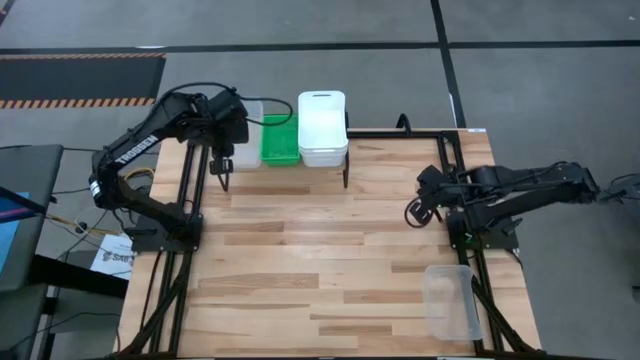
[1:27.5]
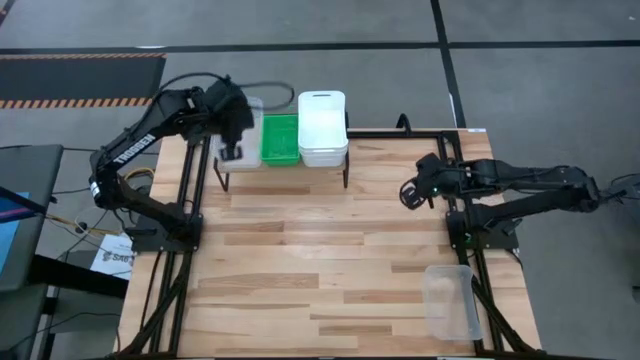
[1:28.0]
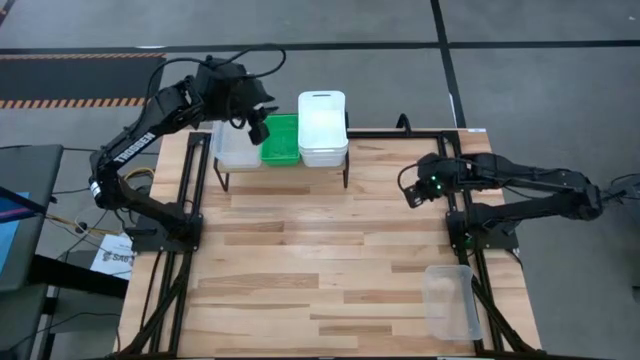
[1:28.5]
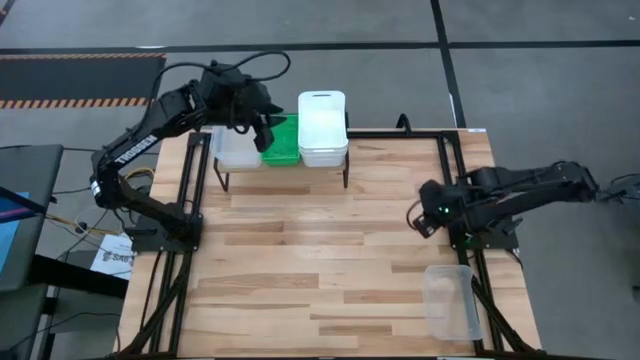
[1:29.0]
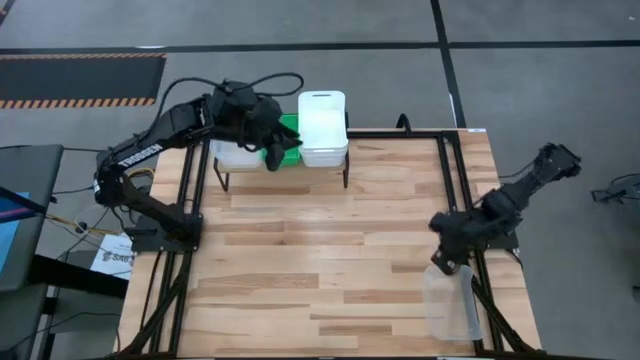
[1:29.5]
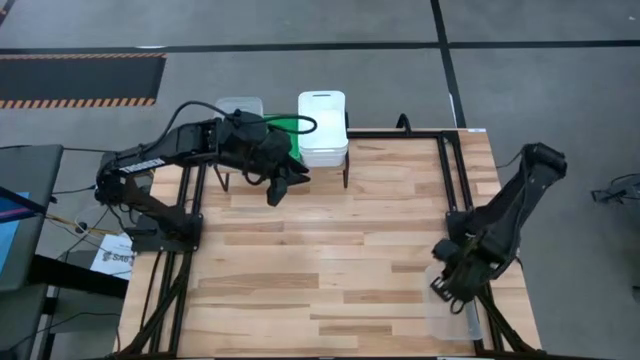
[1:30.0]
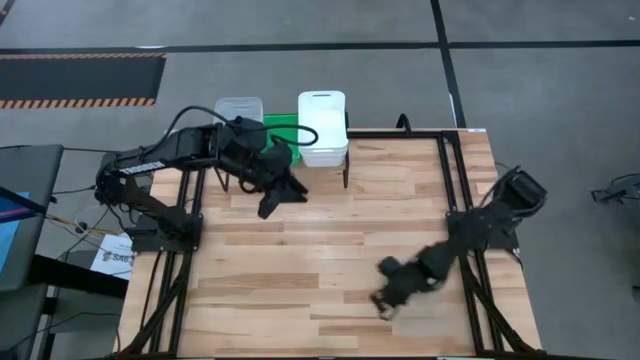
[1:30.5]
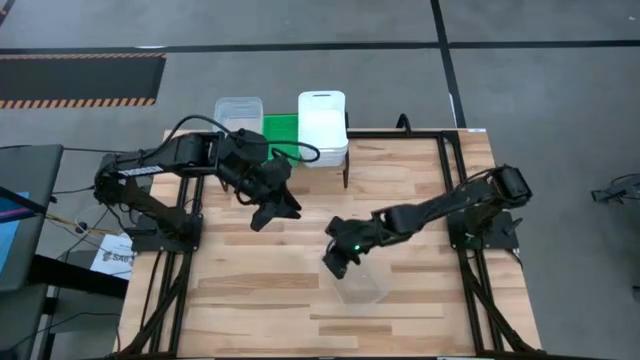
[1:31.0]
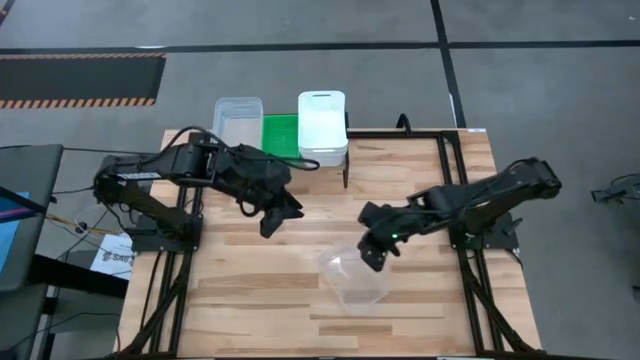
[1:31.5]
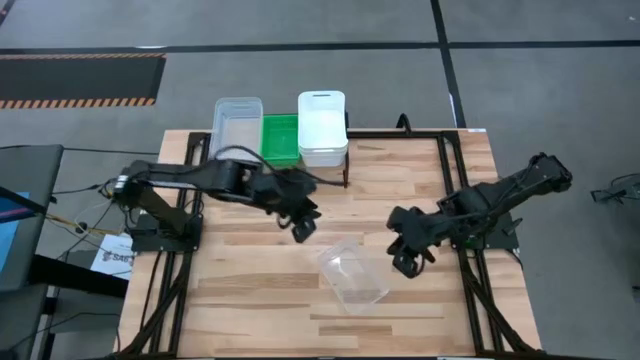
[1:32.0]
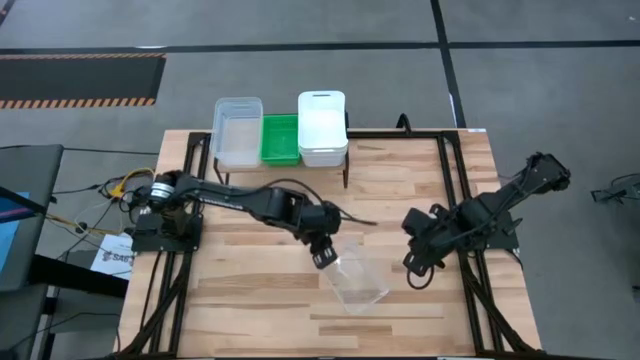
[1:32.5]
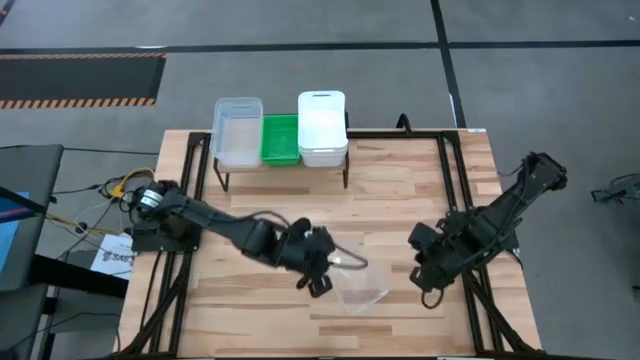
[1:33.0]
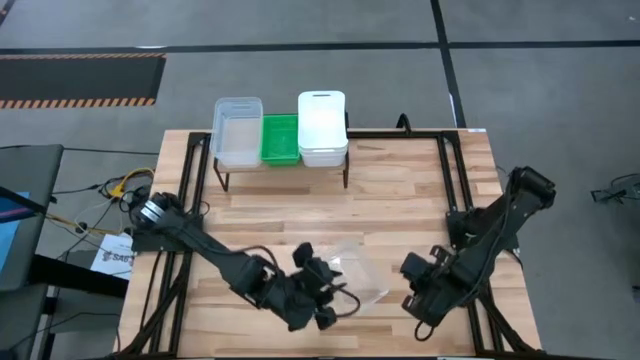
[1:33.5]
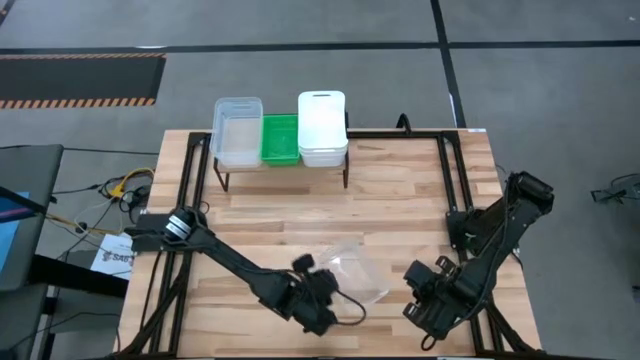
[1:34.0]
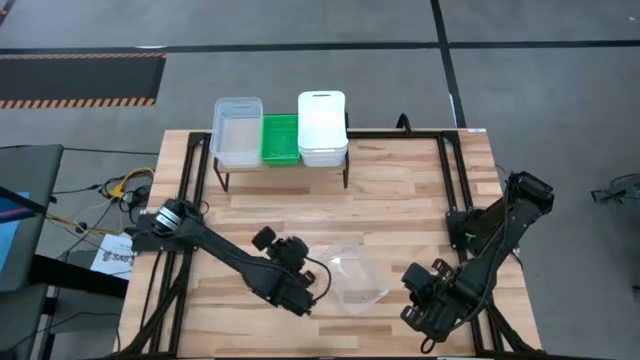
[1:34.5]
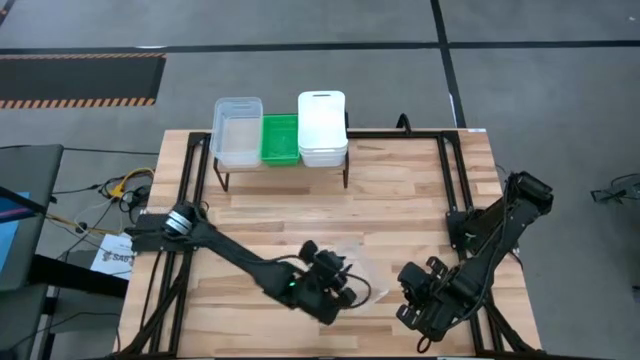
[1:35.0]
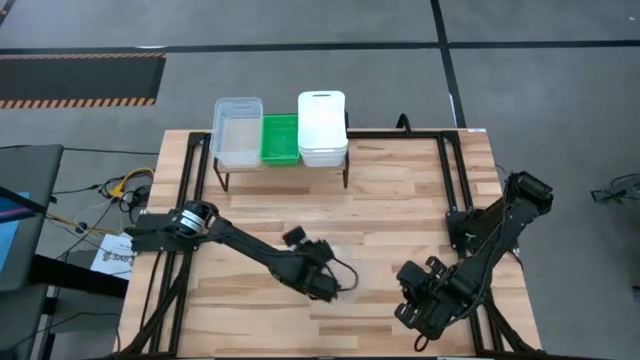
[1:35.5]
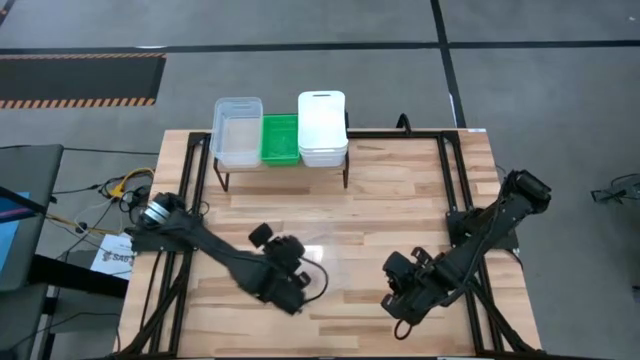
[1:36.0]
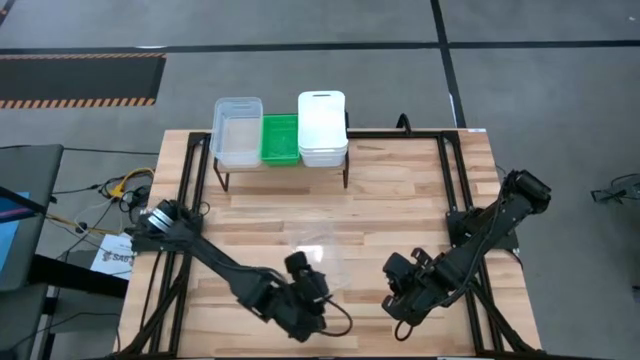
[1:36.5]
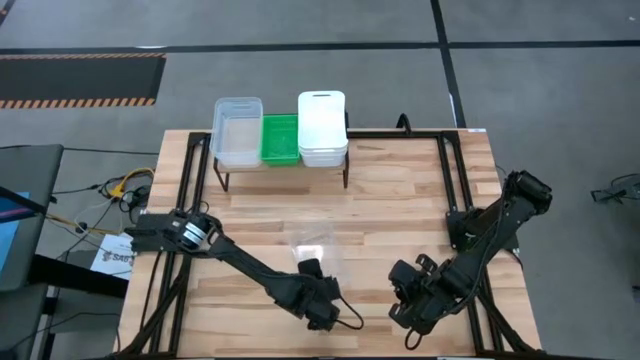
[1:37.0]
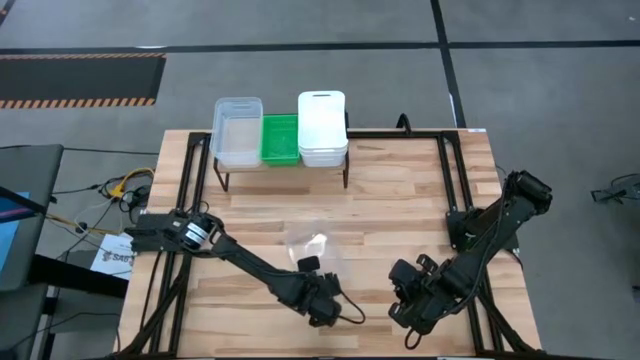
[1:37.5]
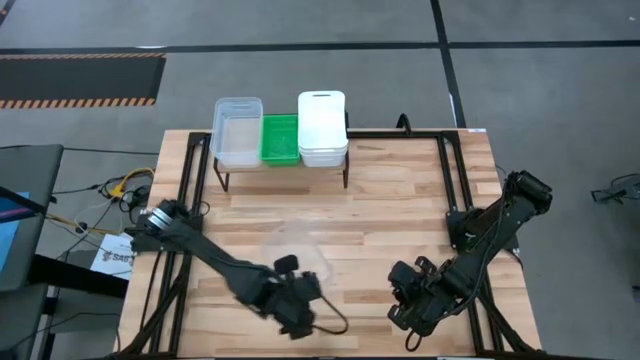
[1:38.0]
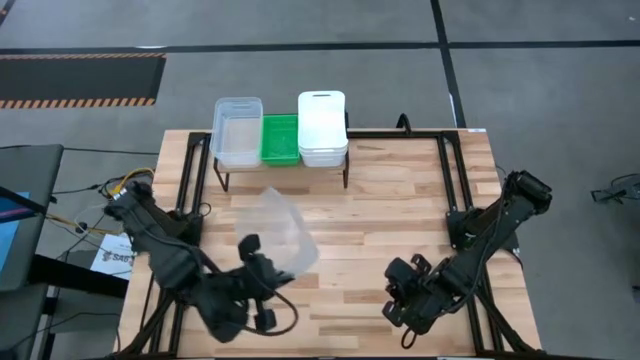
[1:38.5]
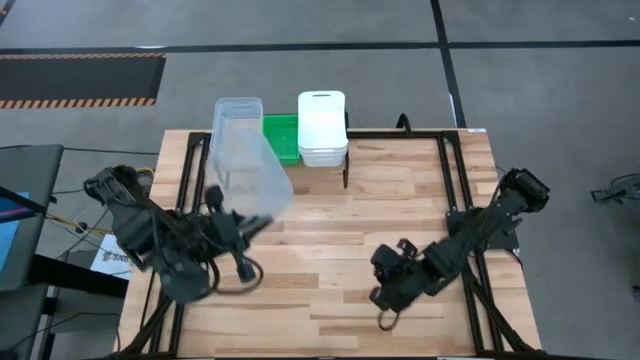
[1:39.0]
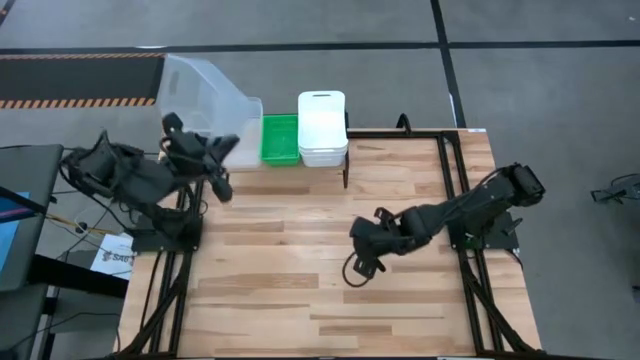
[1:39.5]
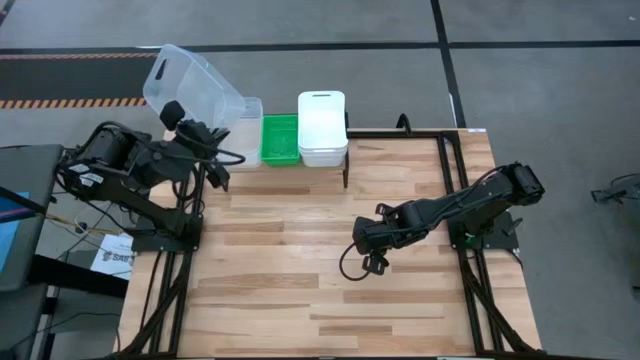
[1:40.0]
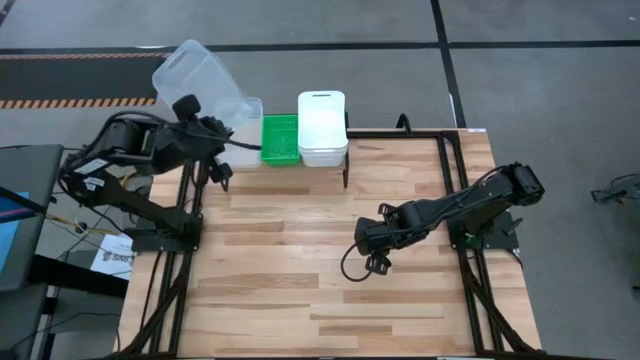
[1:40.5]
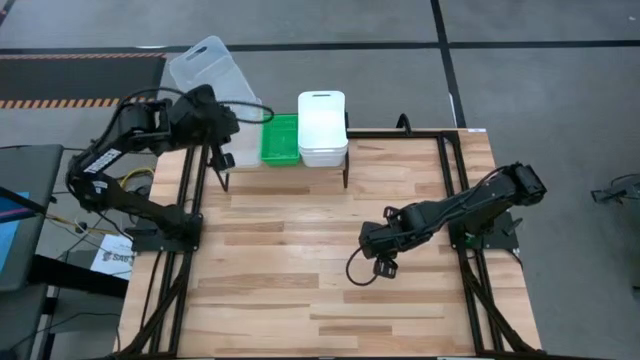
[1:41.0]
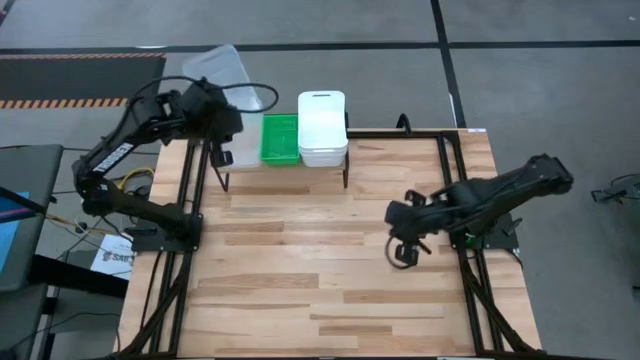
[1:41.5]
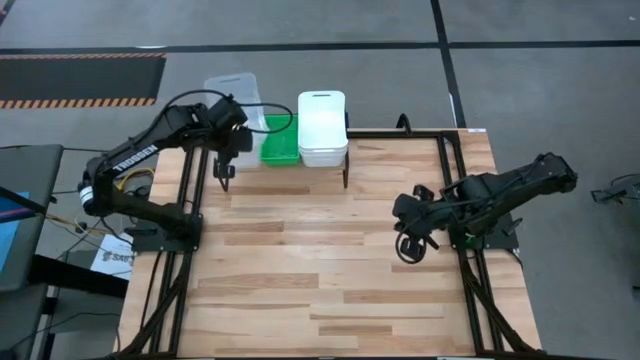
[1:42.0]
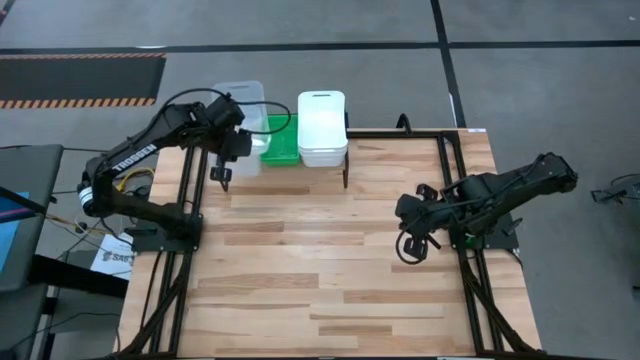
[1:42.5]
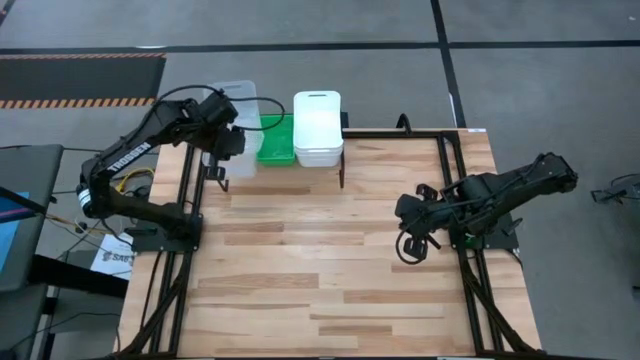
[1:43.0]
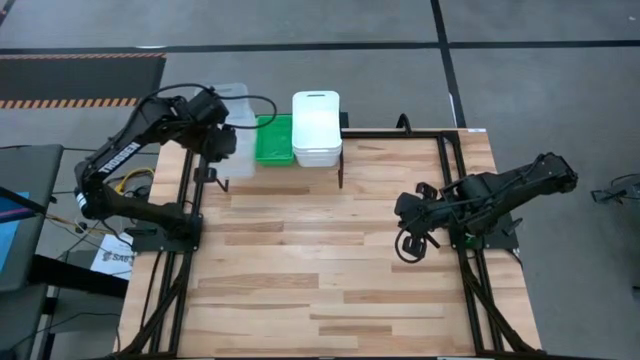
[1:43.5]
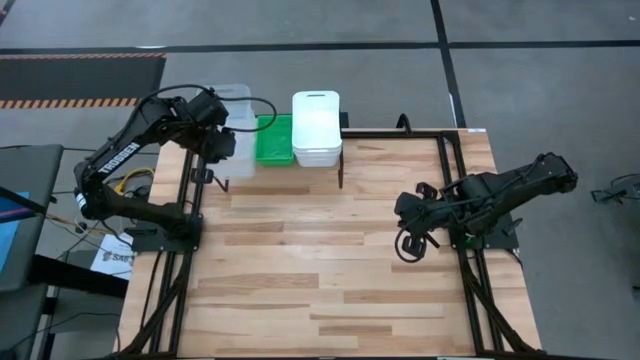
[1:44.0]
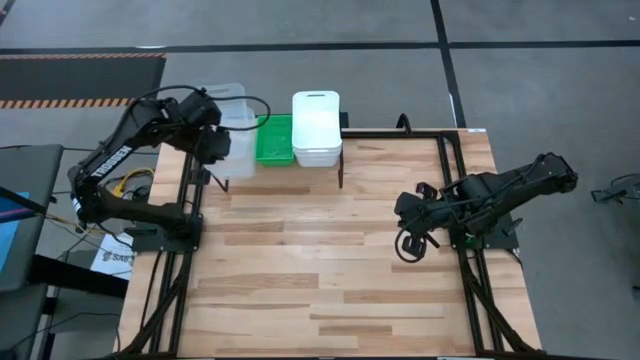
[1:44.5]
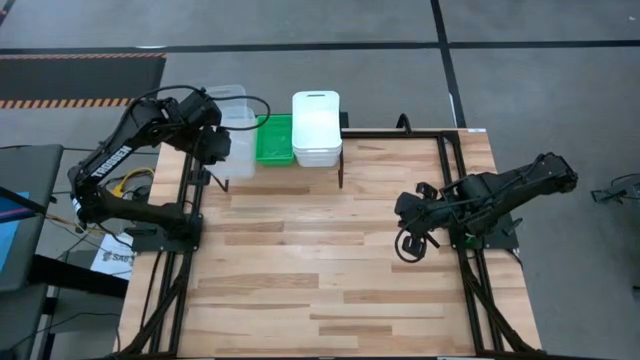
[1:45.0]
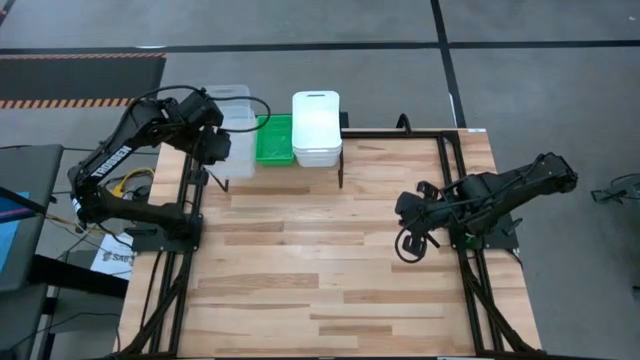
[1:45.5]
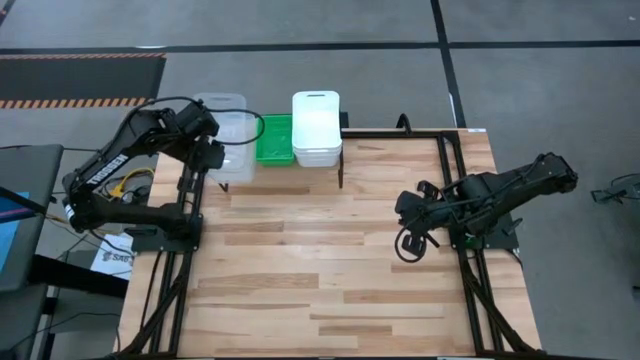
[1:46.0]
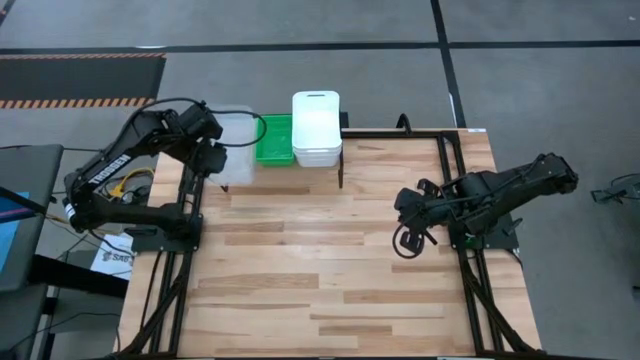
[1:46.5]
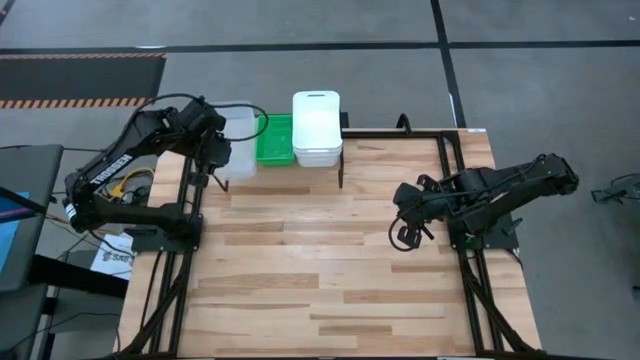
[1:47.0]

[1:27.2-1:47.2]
Task: Stack baskets on shelf by color
Stack the transparent bin on top of the transparent bins on the shelf
